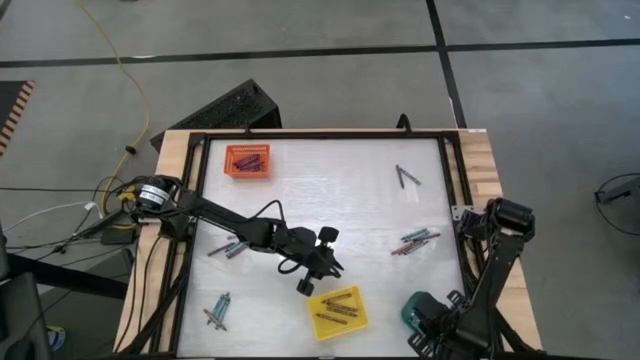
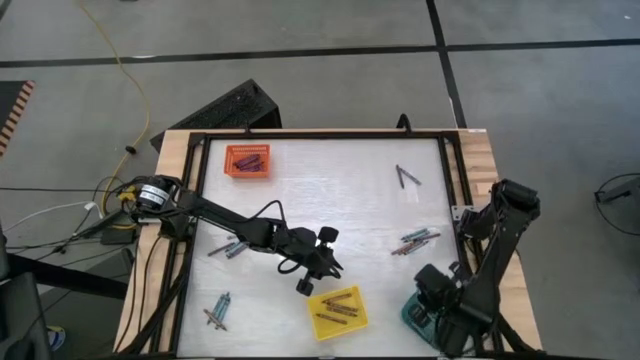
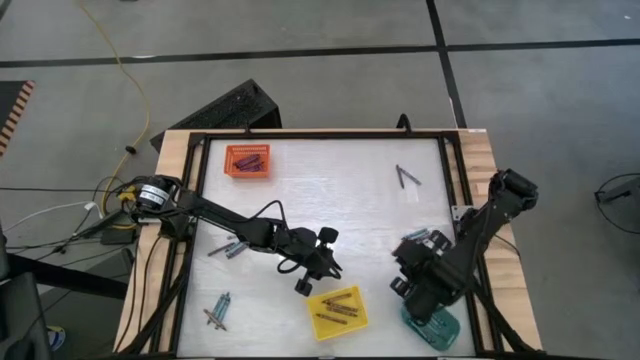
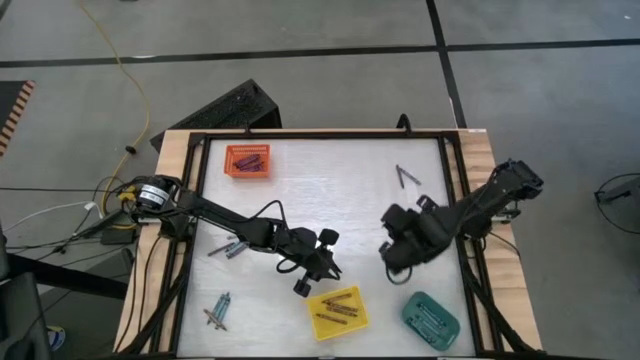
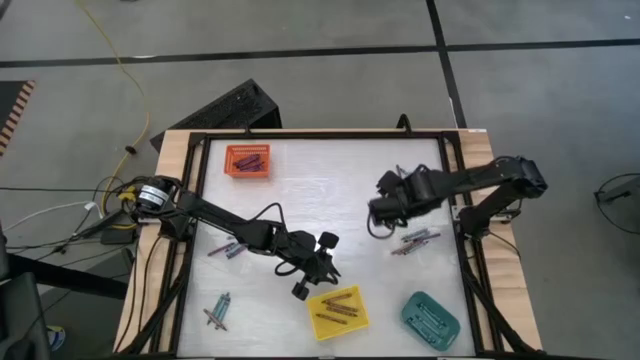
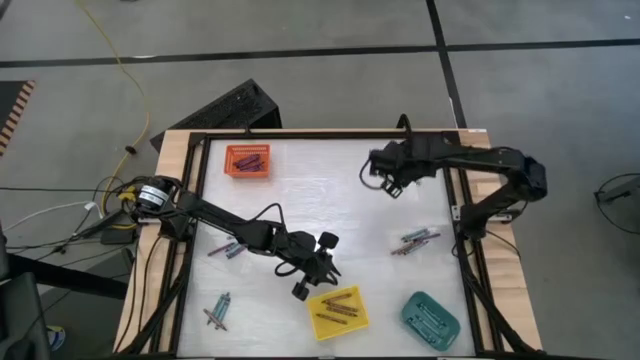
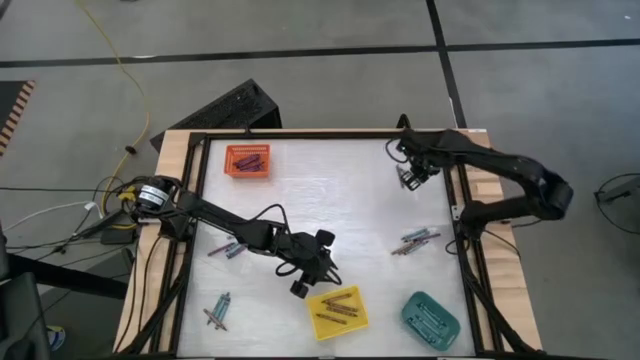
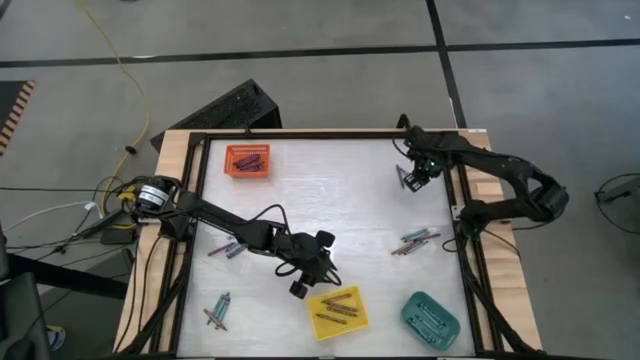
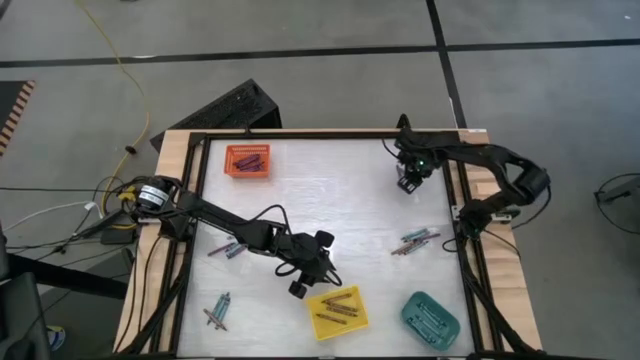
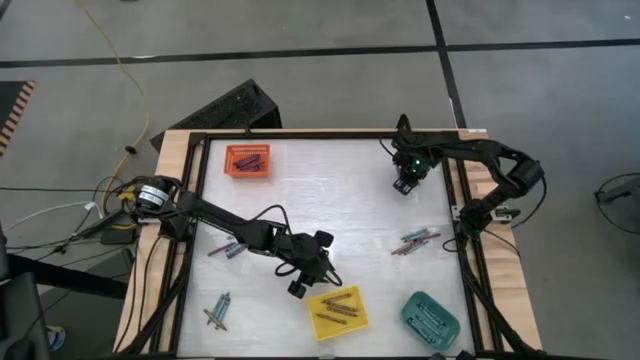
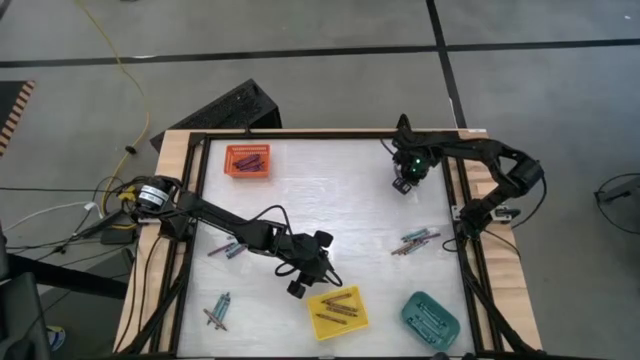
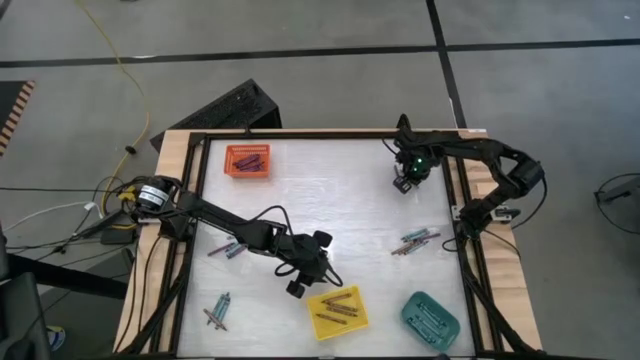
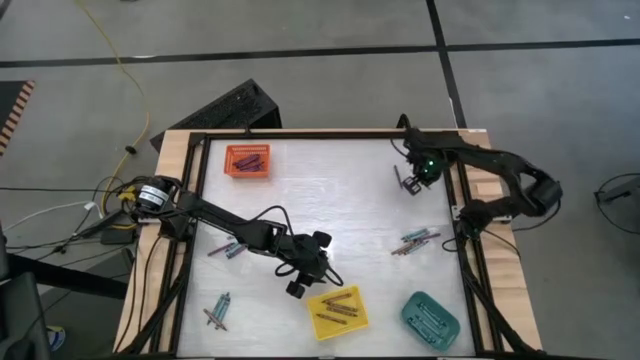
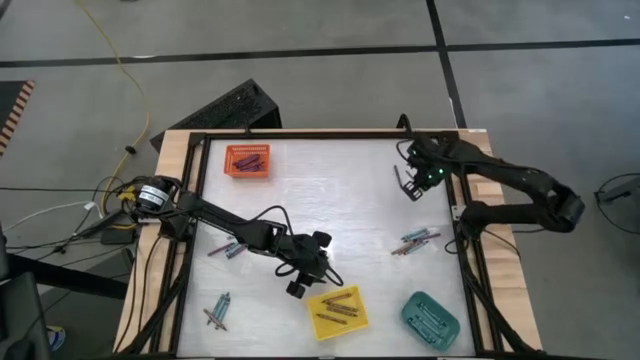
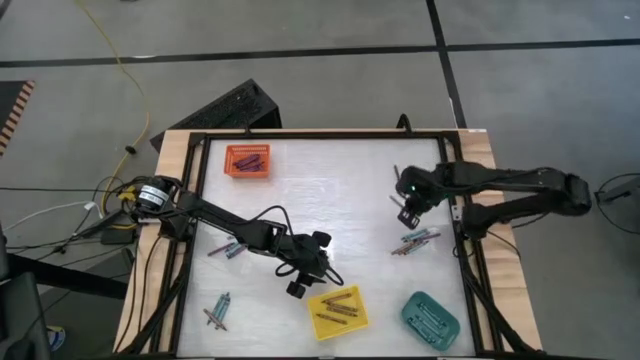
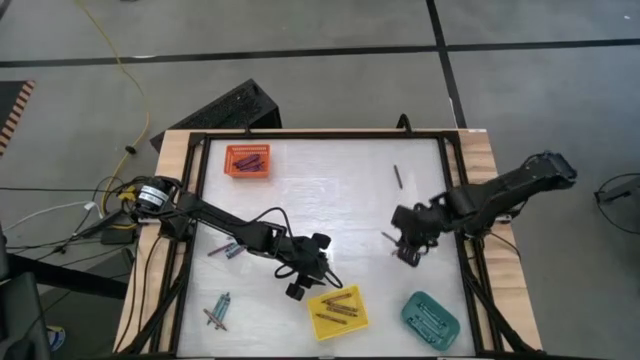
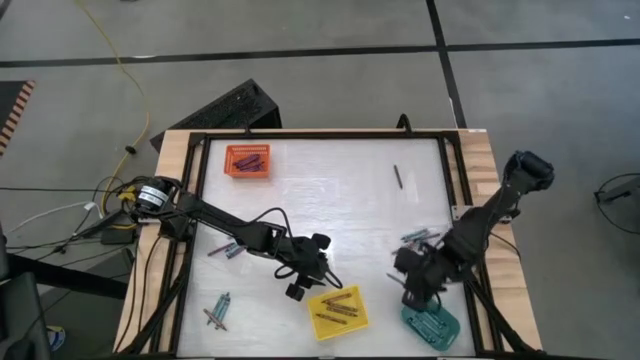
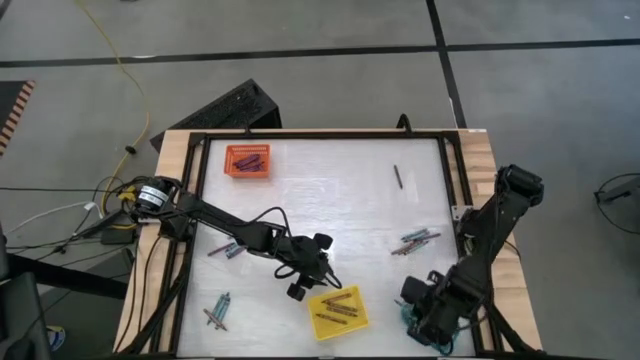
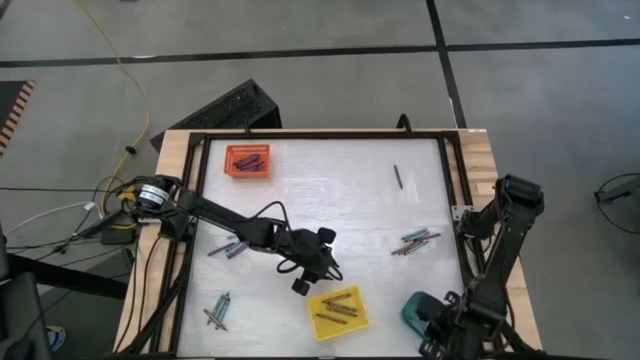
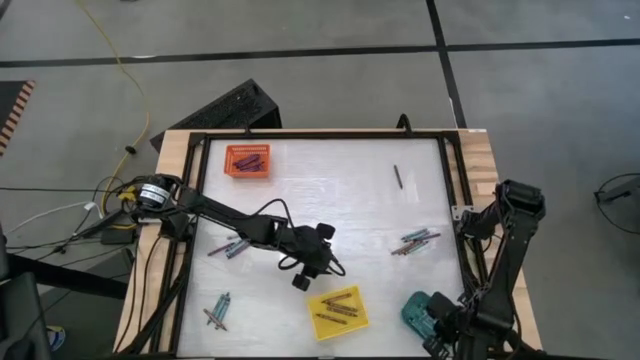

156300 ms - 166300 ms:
Task: Sort crayons
Put the green crayon into the green bin

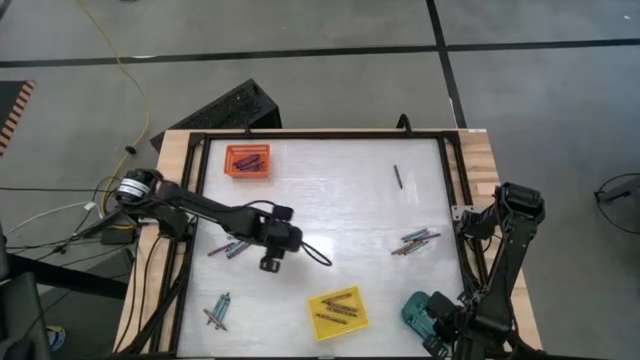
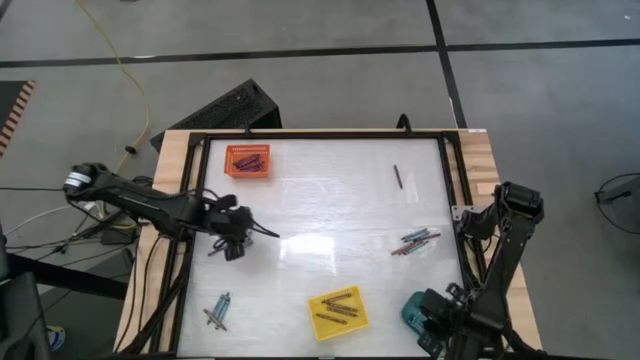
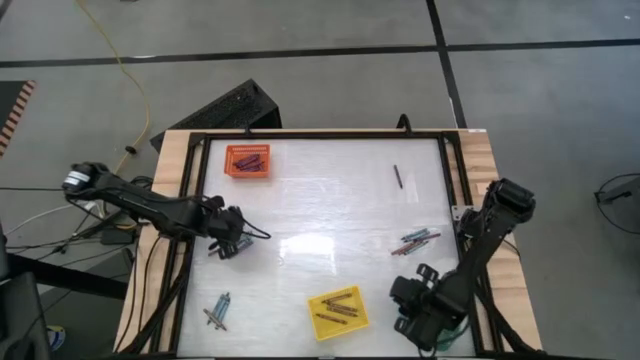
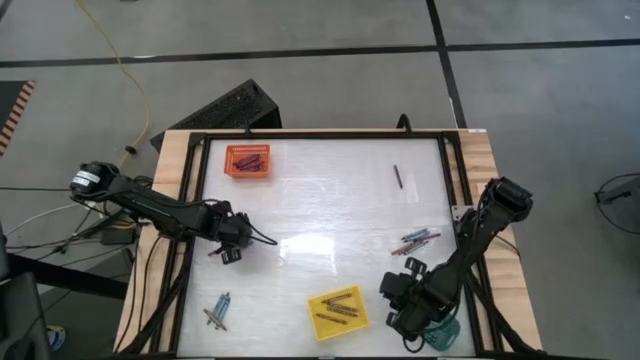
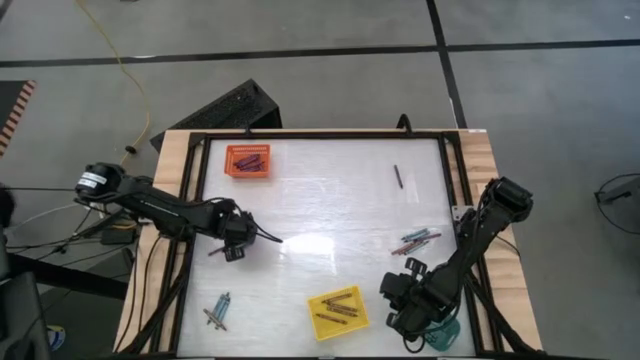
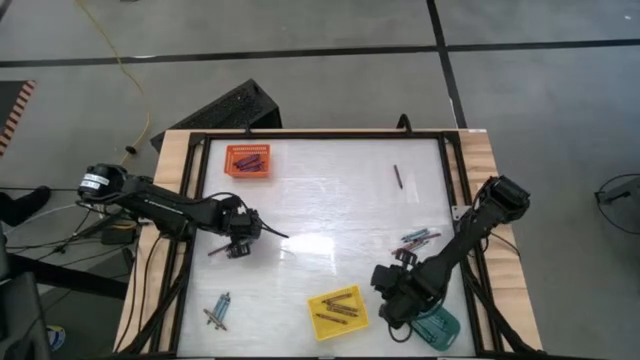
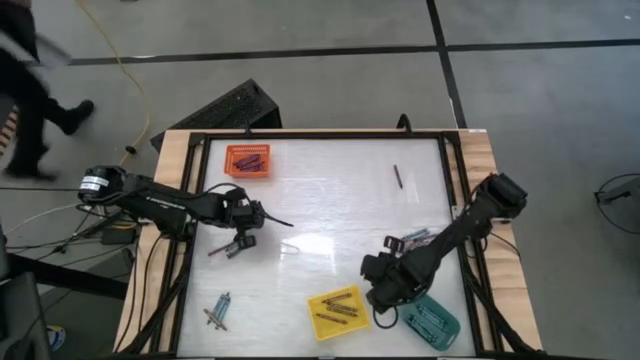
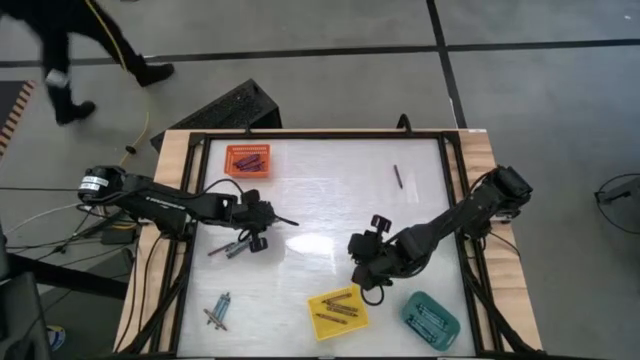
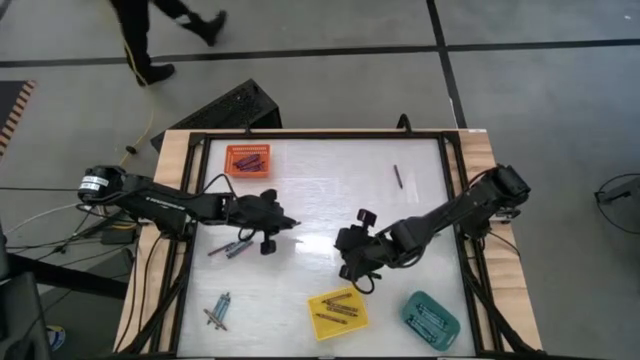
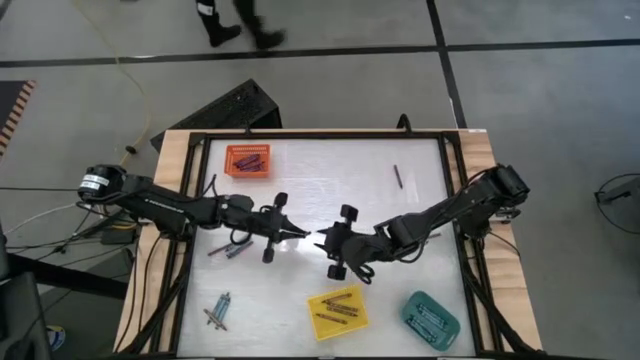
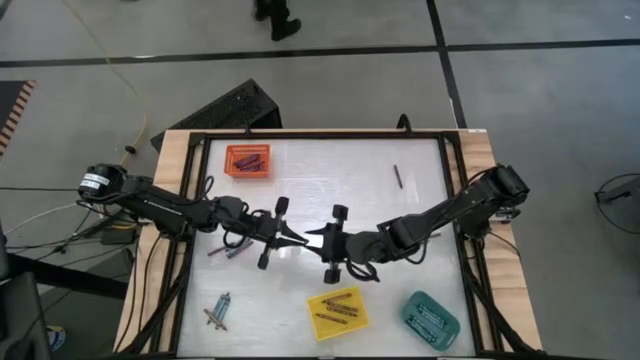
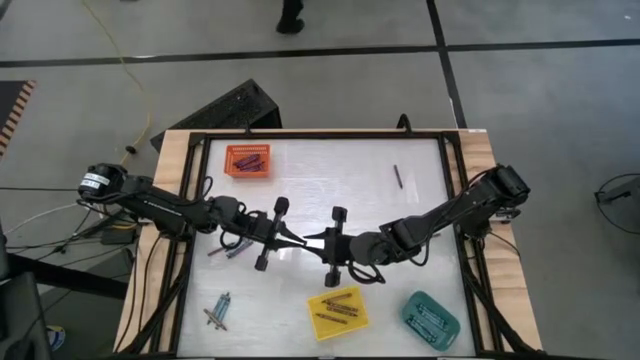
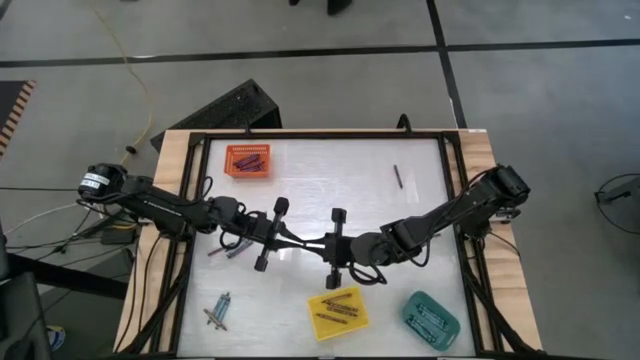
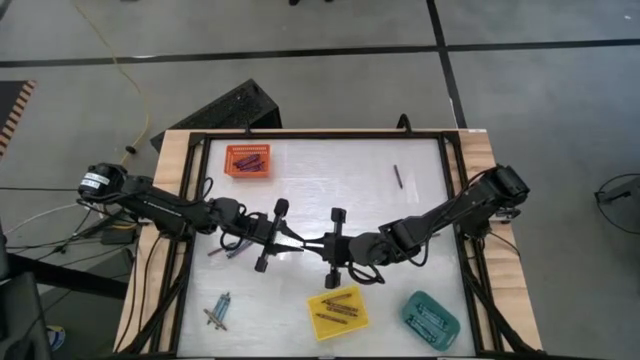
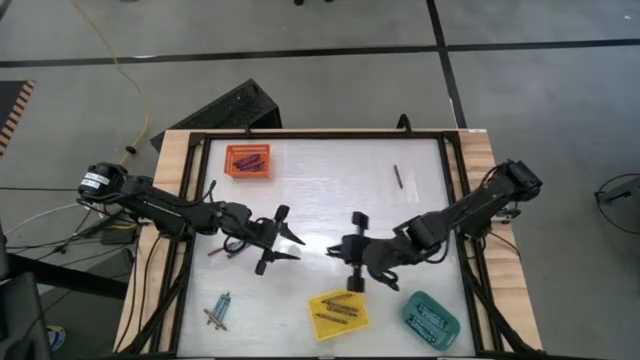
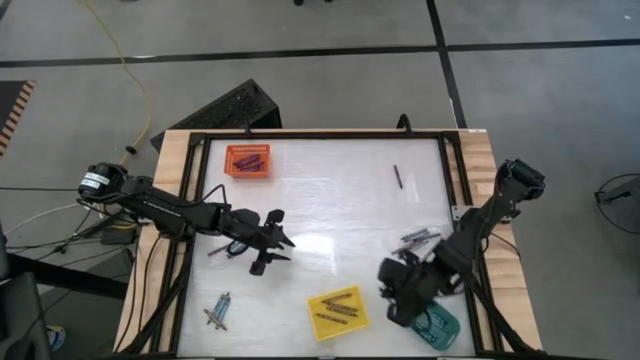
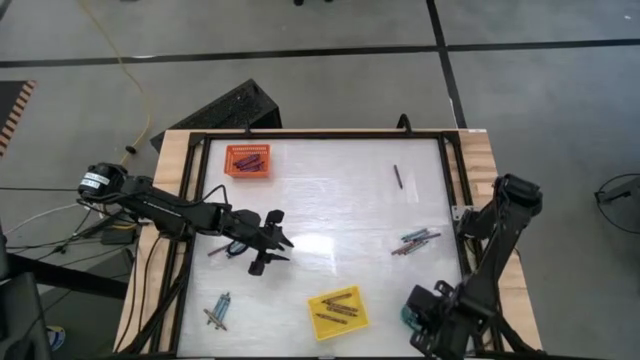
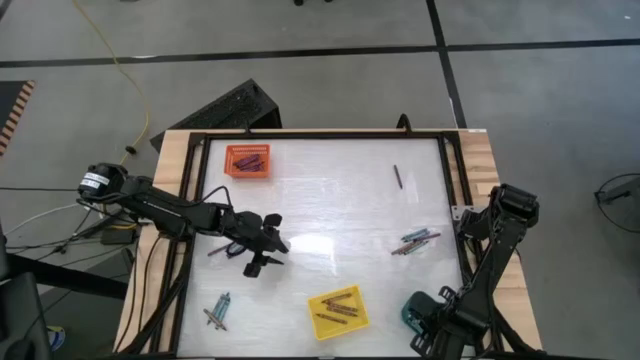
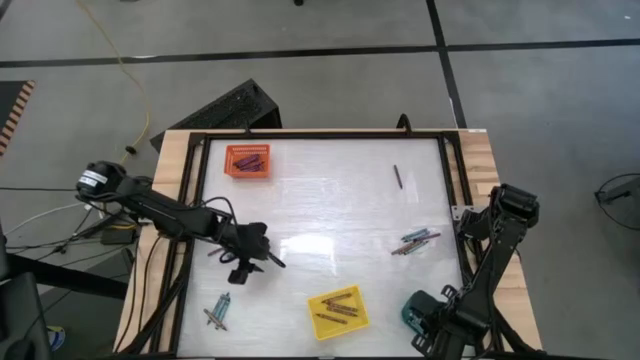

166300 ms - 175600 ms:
Put the blue crayon into the green bin

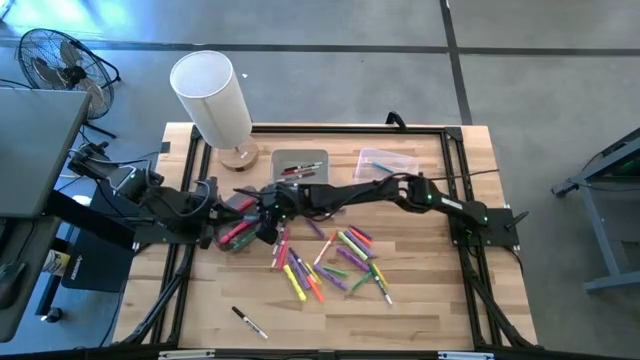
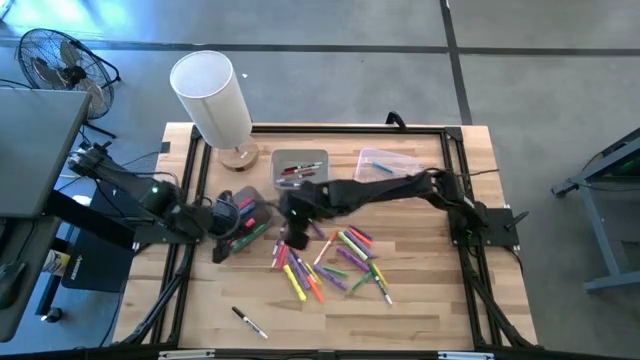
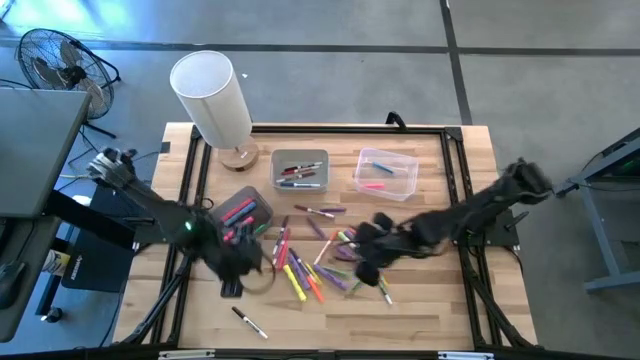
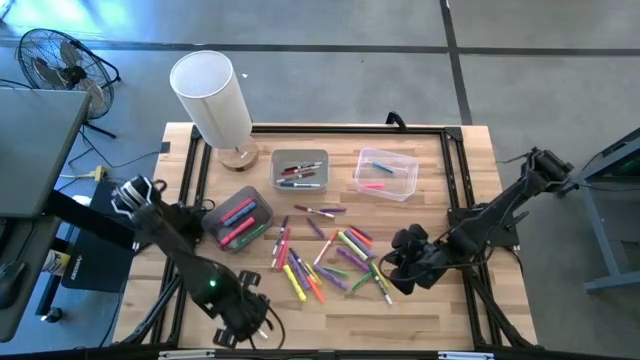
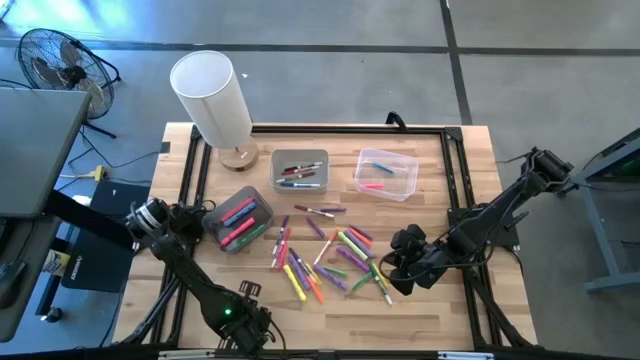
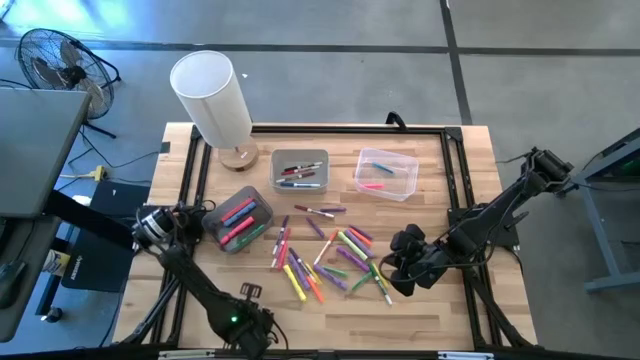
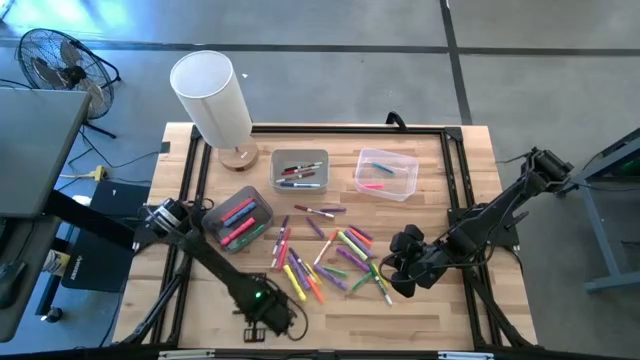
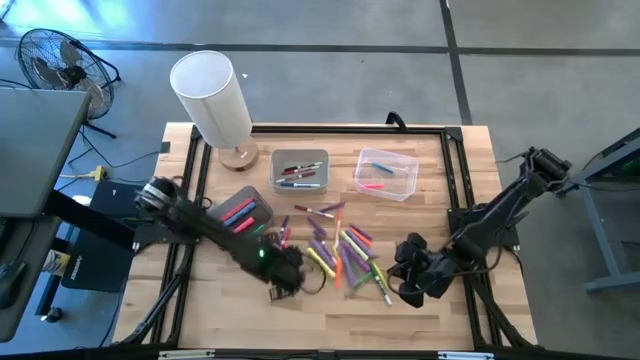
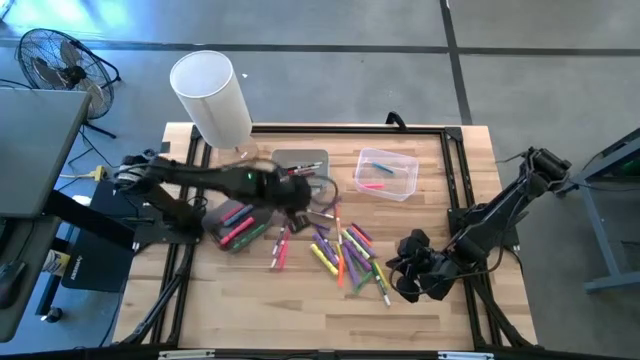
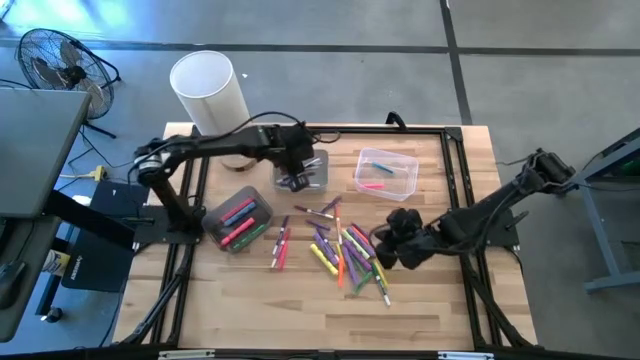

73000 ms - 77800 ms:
Task: Pick & Place Markers
Put the black marker pen into the white bin
